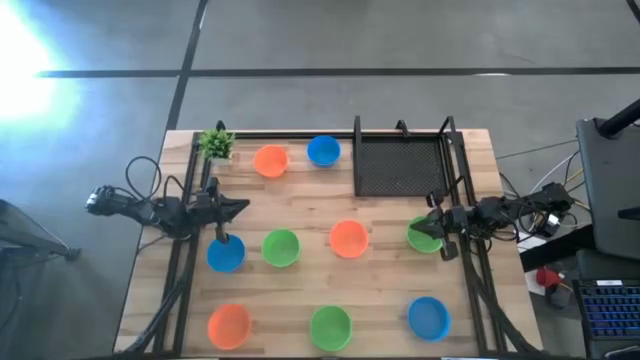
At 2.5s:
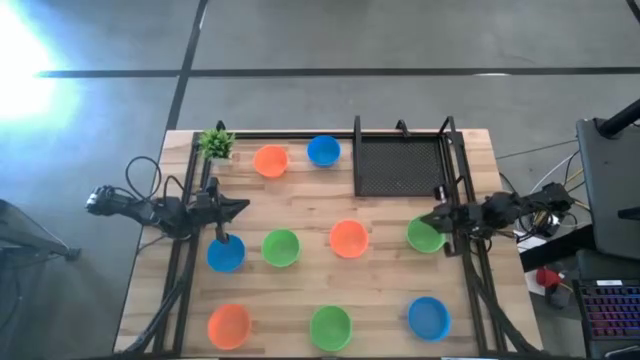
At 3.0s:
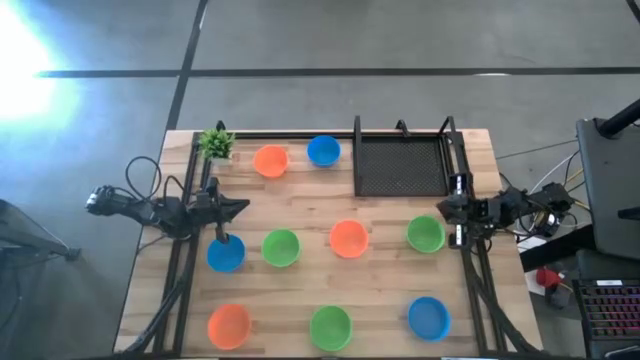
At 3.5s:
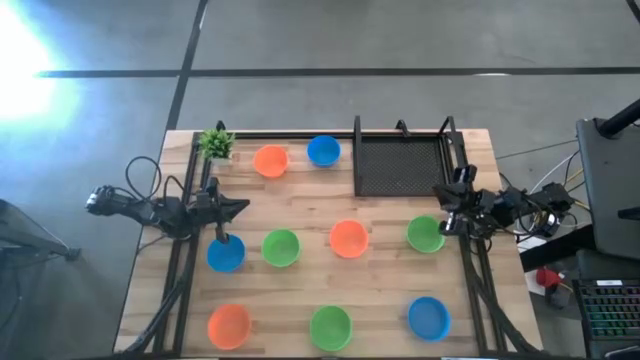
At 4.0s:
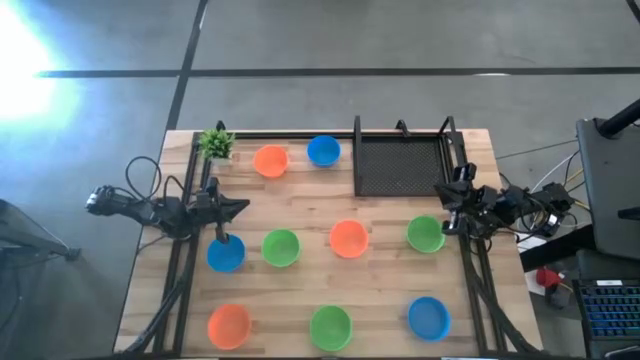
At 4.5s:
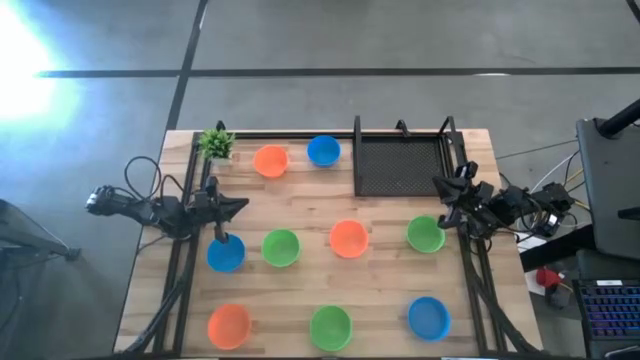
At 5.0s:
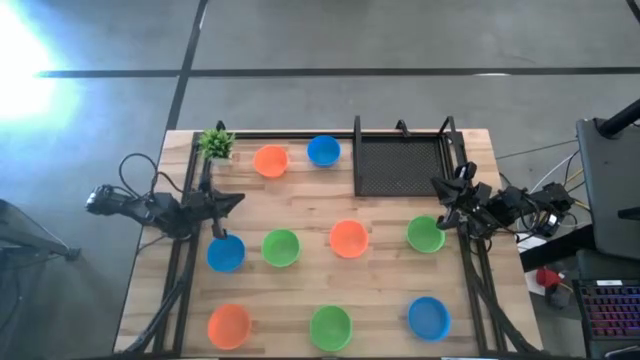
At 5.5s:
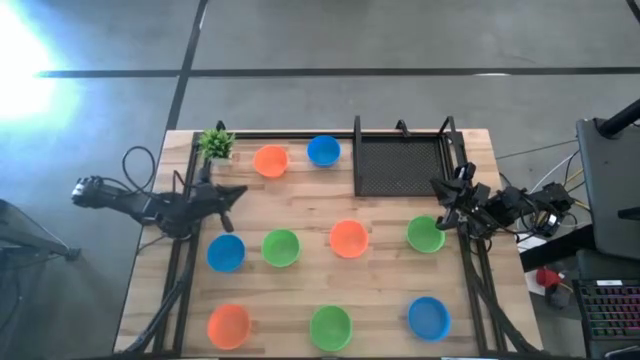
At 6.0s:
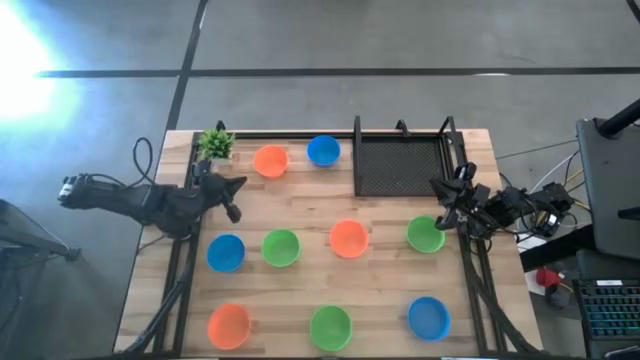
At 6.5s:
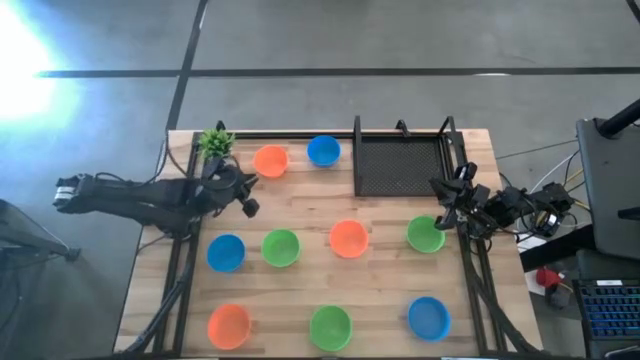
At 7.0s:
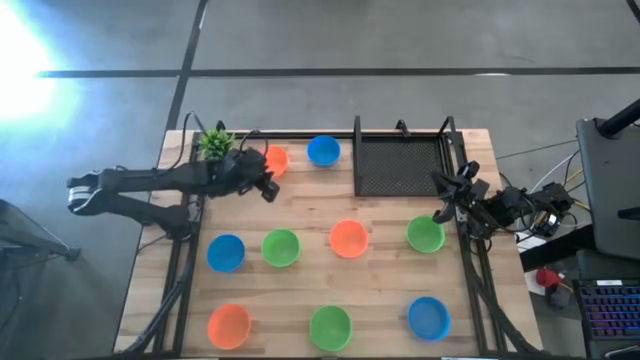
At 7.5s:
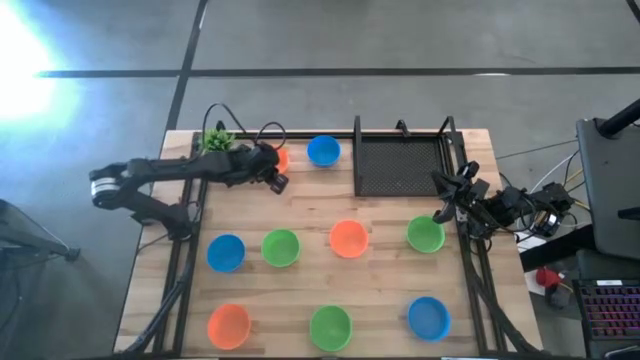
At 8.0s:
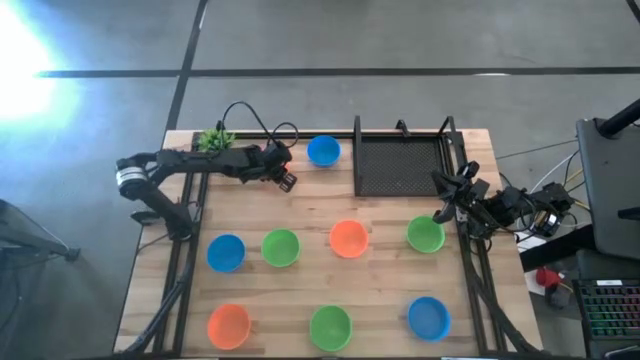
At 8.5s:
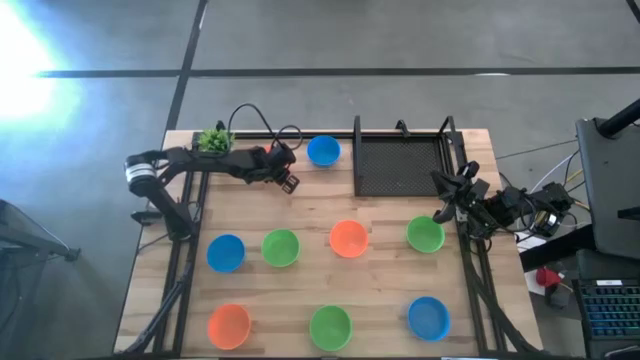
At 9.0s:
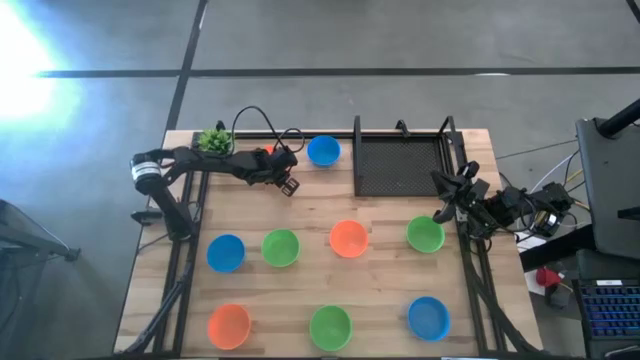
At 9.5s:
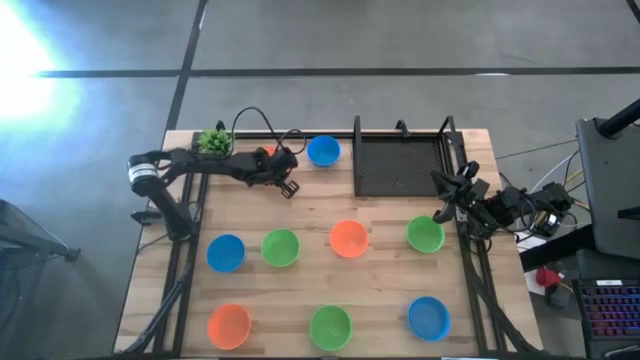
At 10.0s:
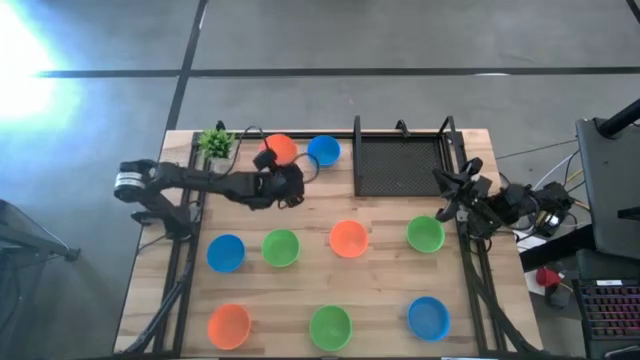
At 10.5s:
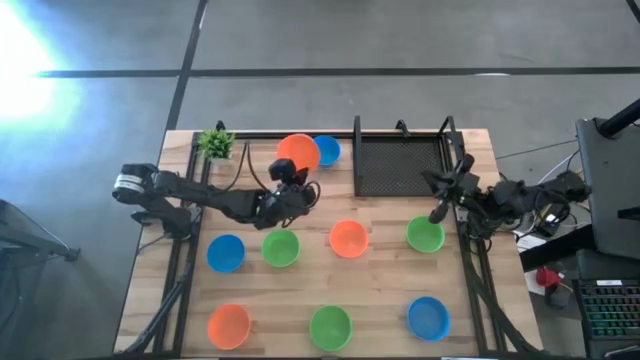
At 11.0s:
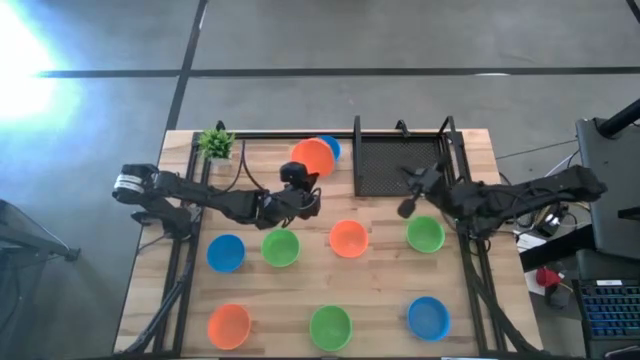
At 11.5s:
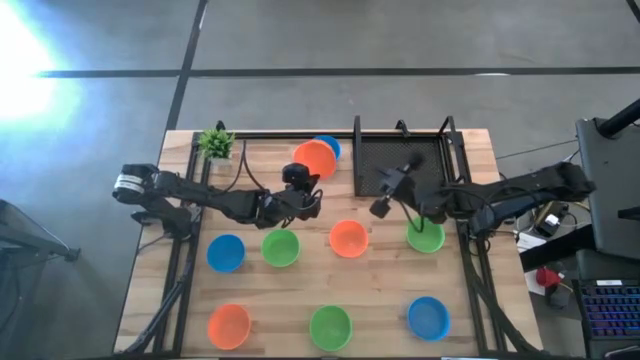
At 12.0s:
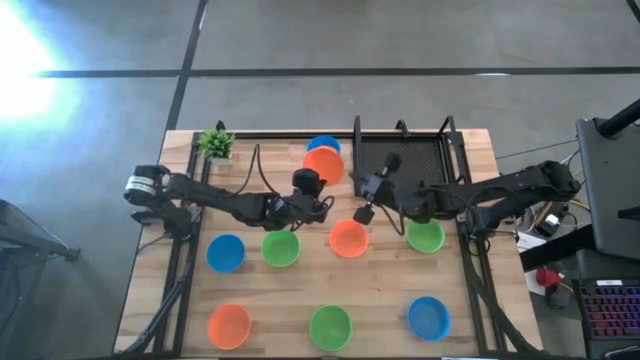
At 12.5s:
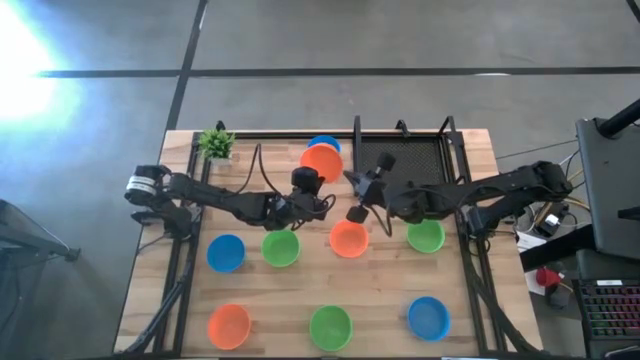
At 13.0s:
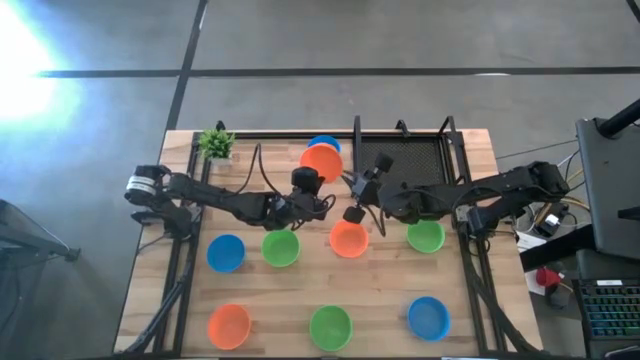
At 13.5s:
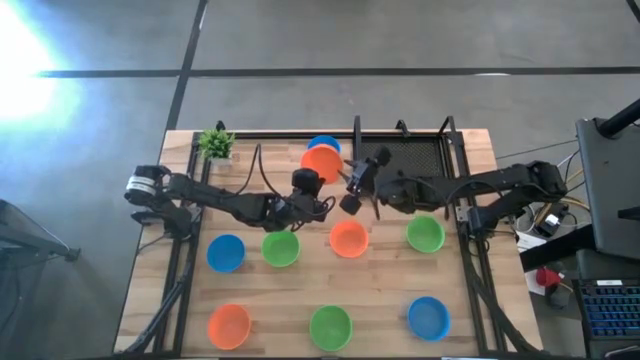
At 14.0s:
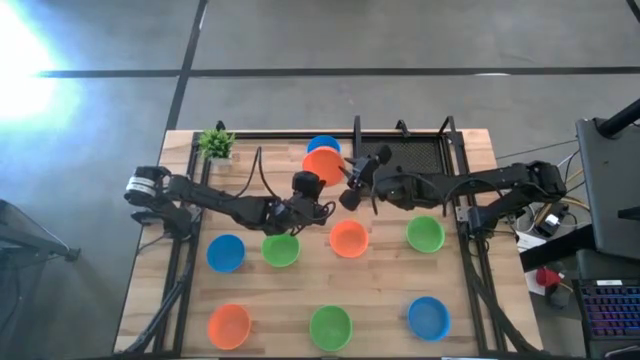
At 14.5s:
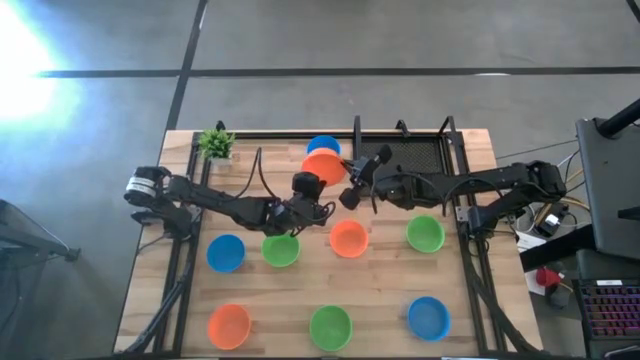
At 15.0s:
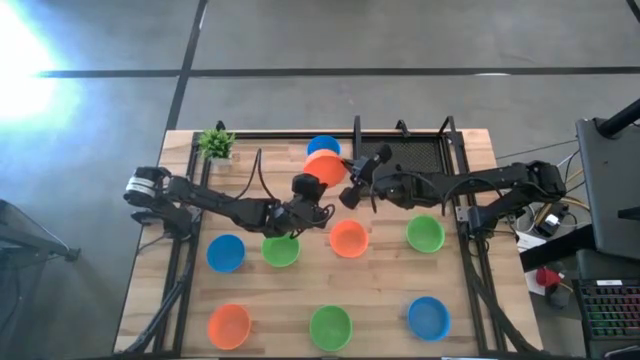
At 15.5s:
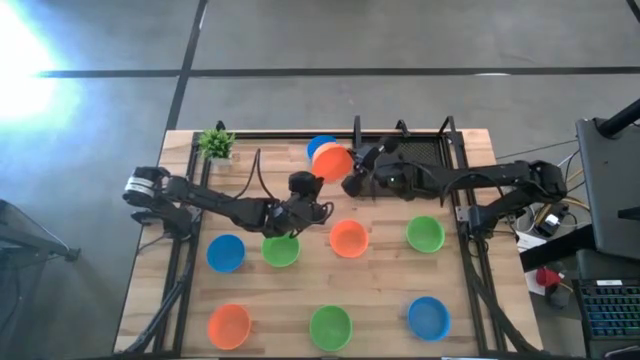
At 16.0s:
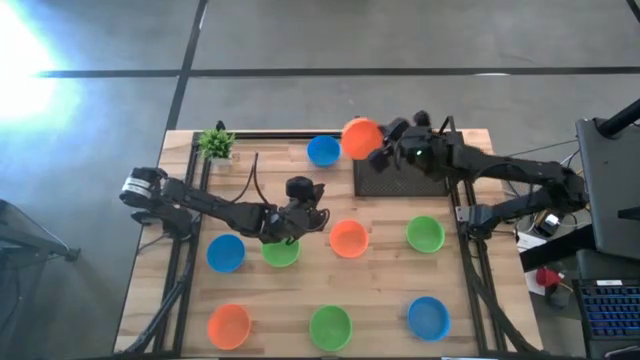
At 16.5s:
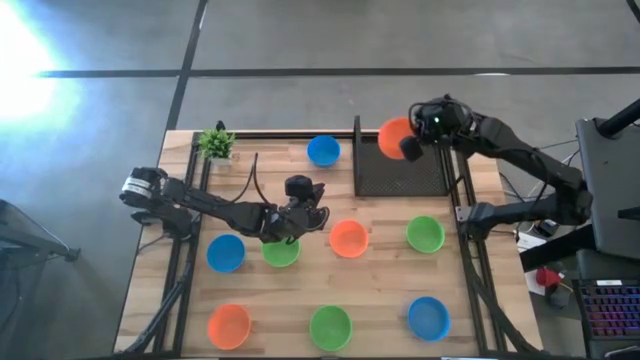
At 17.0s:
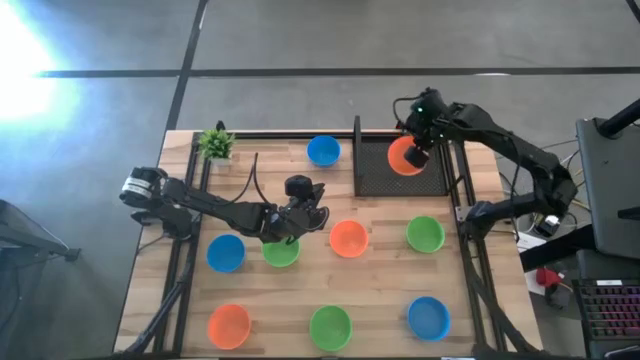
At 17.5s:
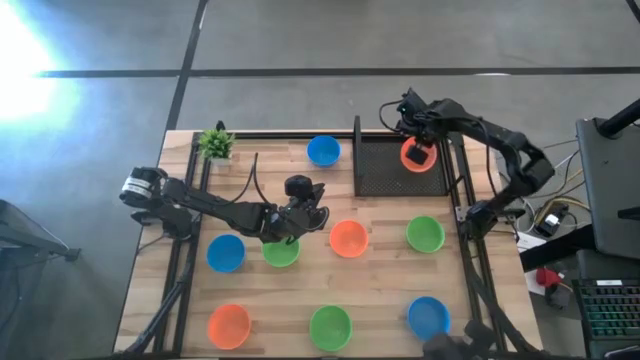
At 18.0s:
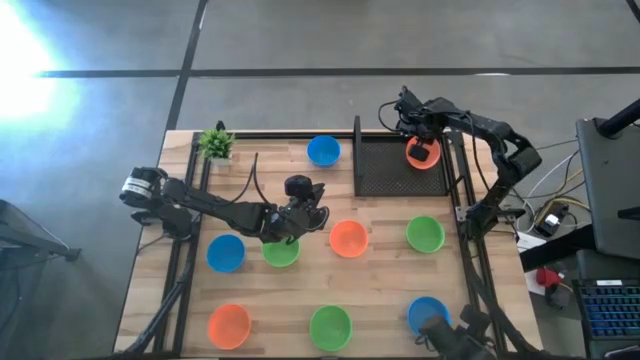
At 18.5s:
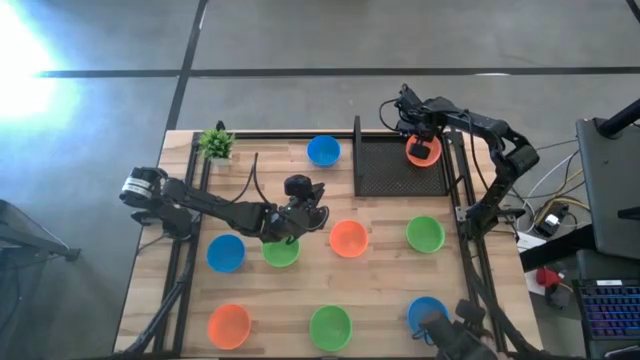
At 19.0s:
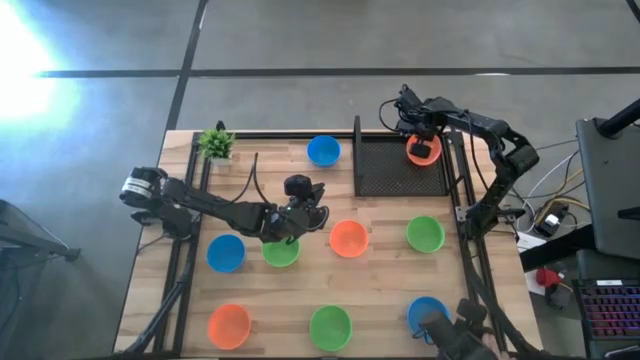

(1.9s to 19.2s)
Task: Pick & Place Mini bowls
Put the top orange bowl on the shelf

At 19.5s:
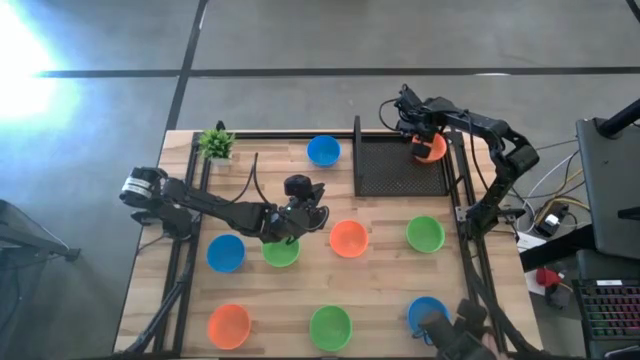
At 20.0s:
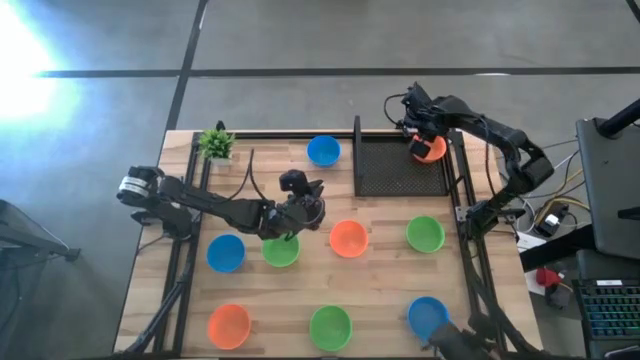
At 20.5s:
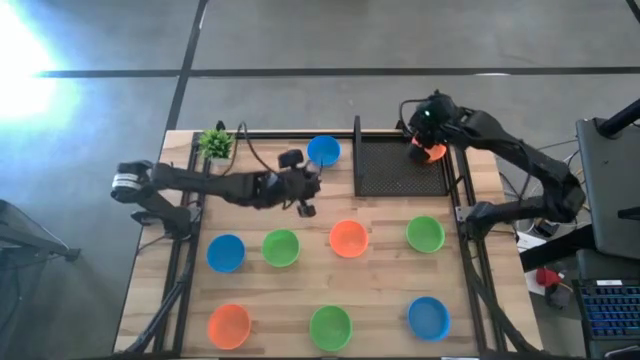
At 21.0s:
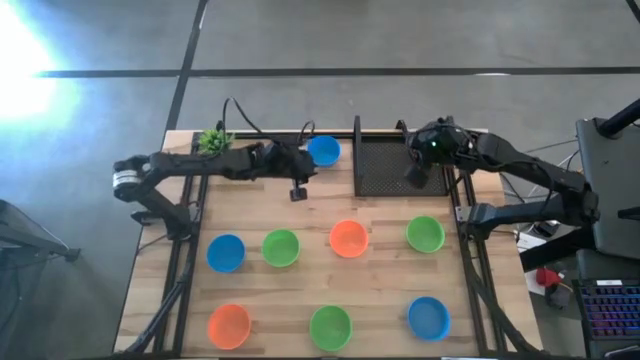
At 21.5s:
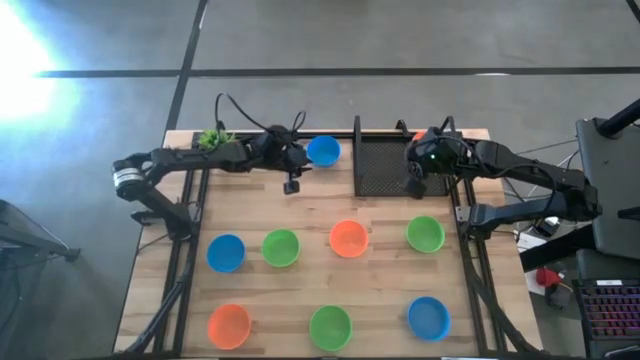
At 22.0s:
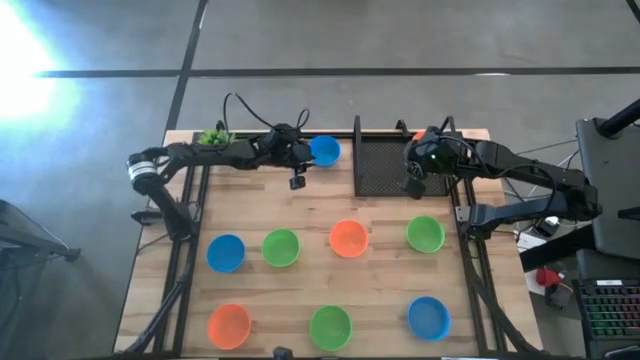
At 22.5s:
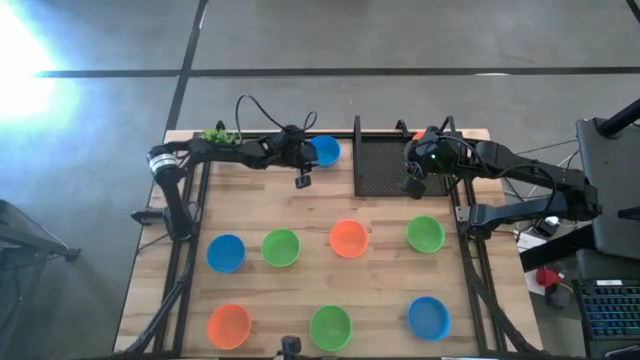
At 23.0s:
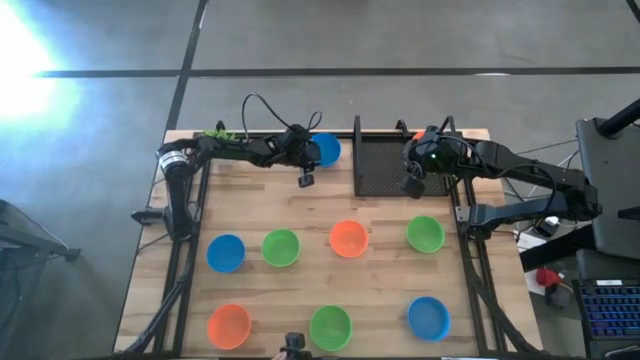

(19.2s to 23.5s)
Put the top blue bowl on the shelf
